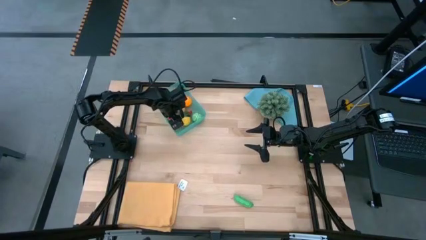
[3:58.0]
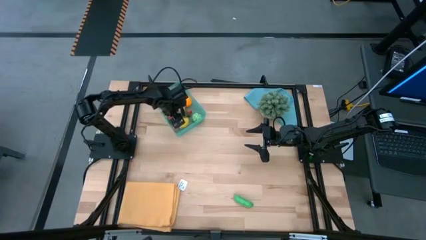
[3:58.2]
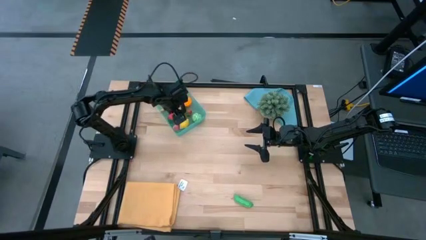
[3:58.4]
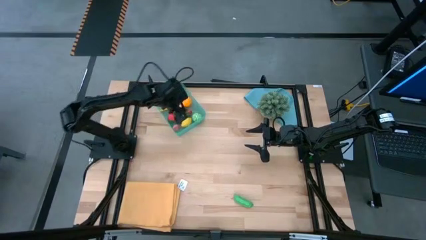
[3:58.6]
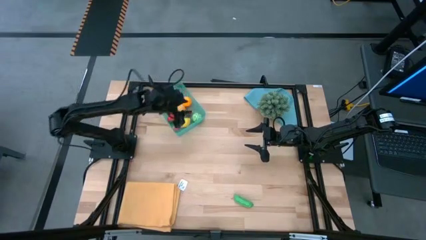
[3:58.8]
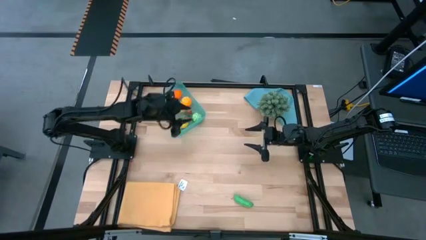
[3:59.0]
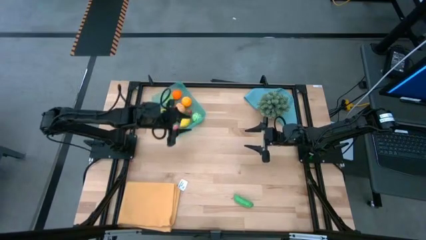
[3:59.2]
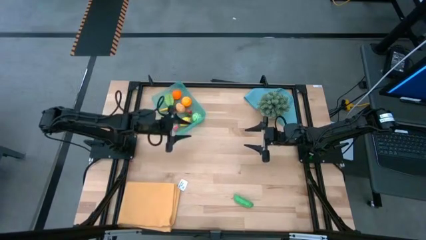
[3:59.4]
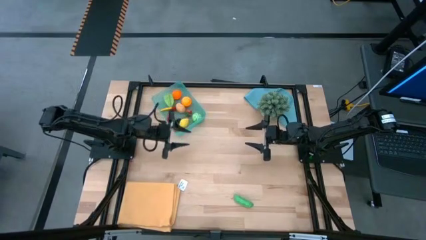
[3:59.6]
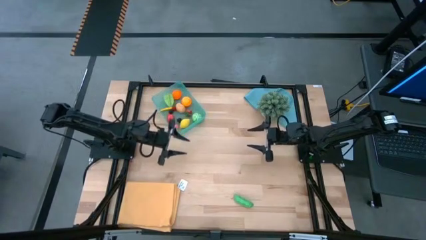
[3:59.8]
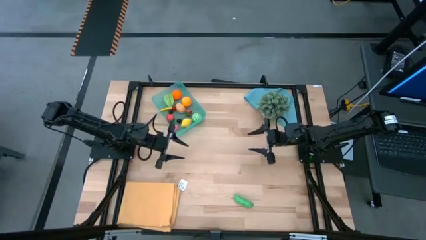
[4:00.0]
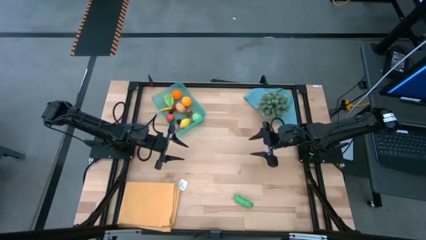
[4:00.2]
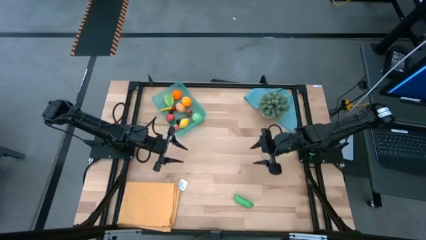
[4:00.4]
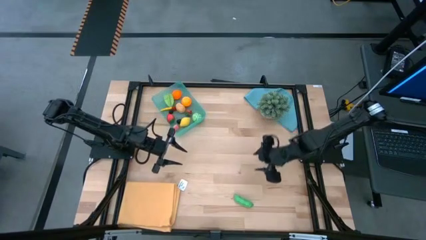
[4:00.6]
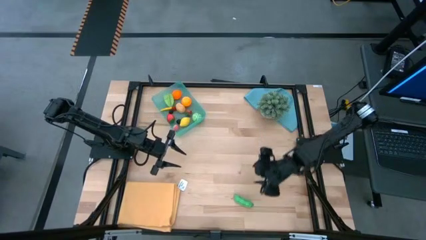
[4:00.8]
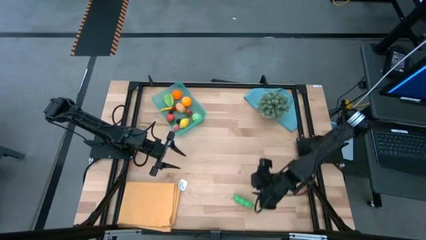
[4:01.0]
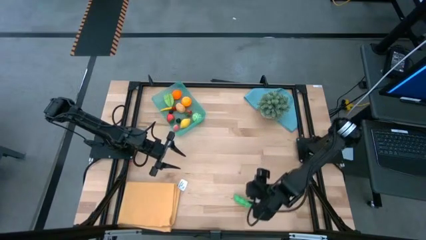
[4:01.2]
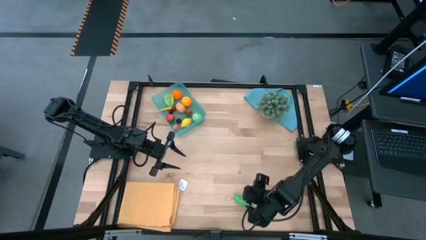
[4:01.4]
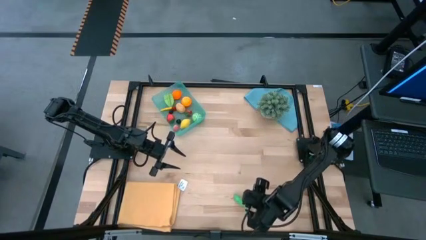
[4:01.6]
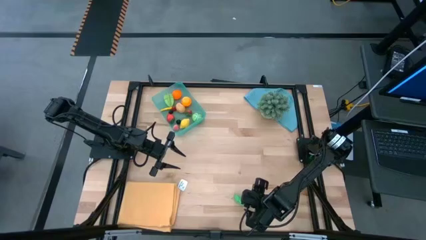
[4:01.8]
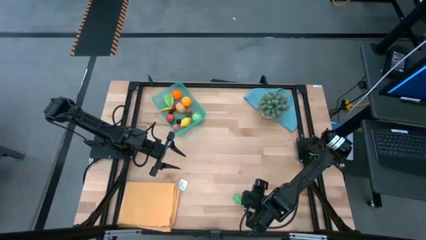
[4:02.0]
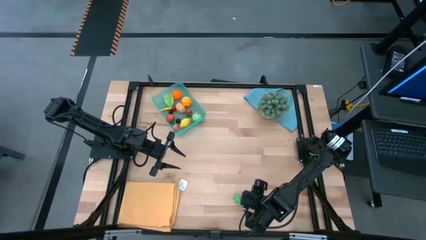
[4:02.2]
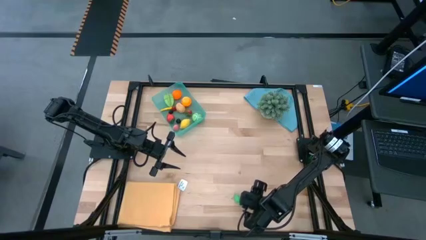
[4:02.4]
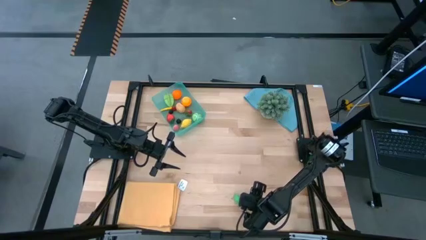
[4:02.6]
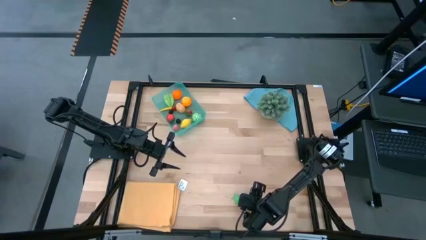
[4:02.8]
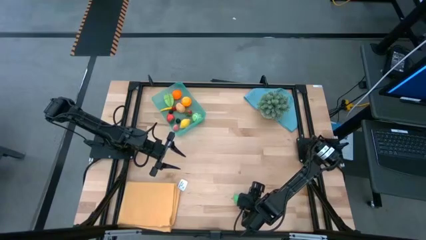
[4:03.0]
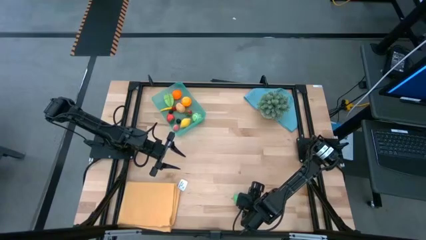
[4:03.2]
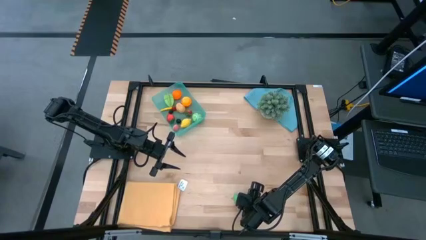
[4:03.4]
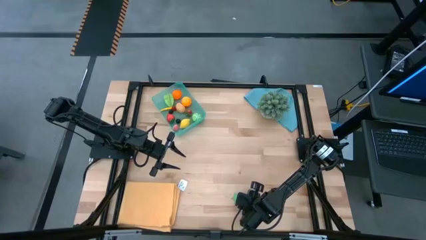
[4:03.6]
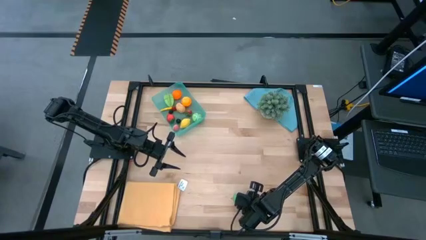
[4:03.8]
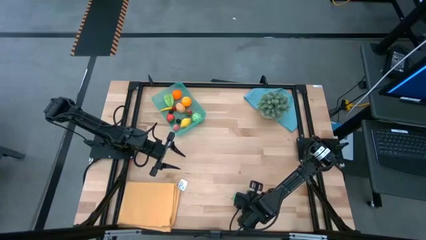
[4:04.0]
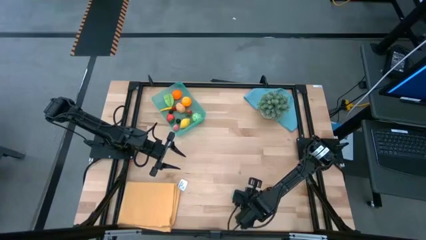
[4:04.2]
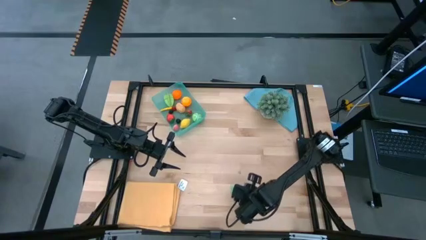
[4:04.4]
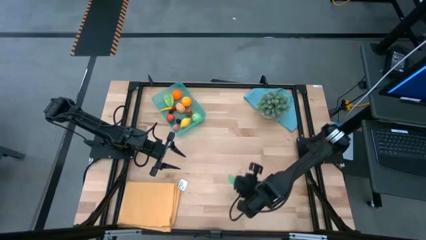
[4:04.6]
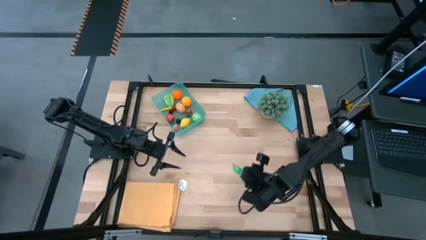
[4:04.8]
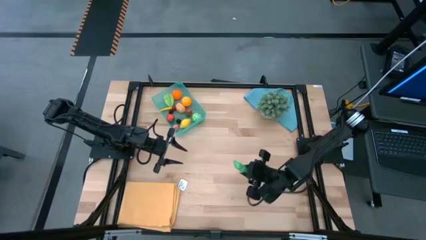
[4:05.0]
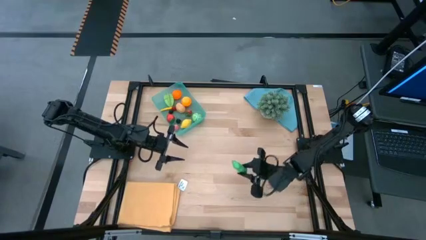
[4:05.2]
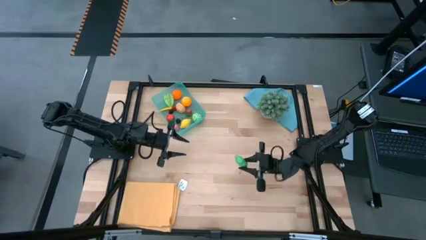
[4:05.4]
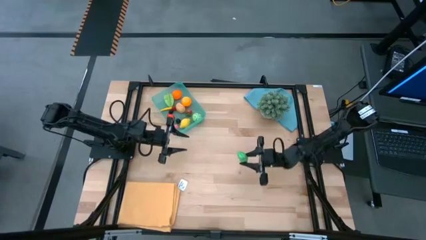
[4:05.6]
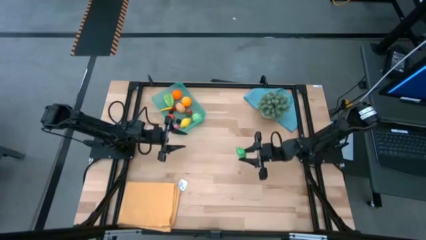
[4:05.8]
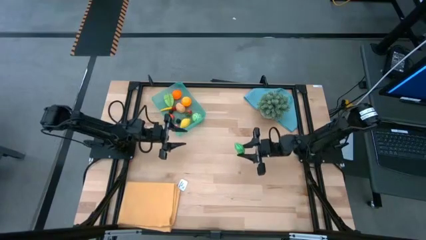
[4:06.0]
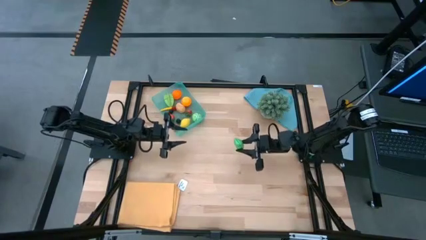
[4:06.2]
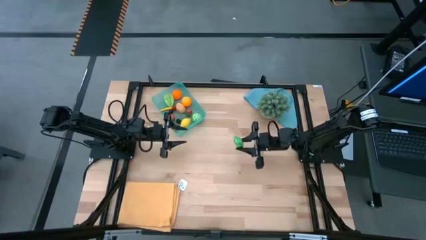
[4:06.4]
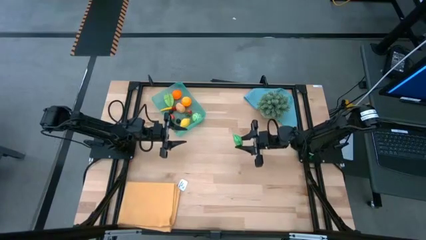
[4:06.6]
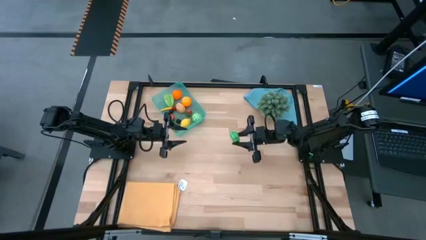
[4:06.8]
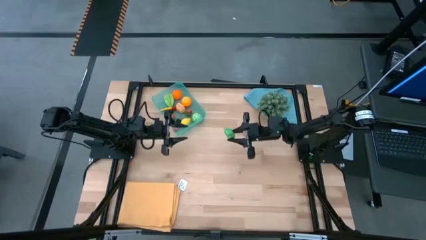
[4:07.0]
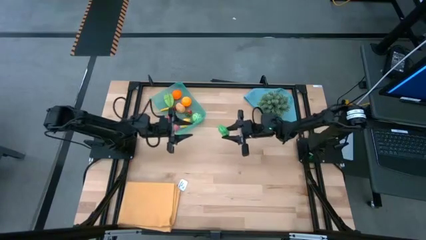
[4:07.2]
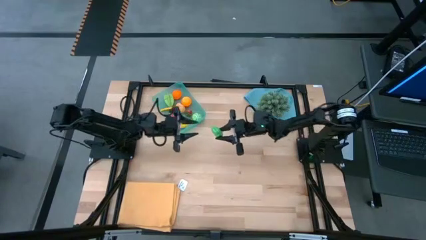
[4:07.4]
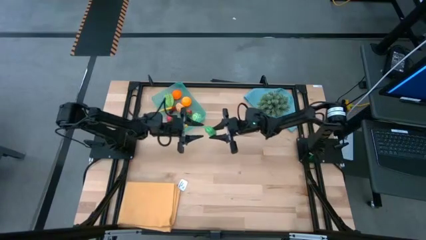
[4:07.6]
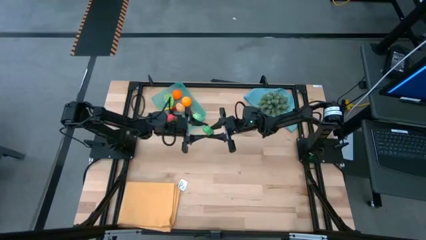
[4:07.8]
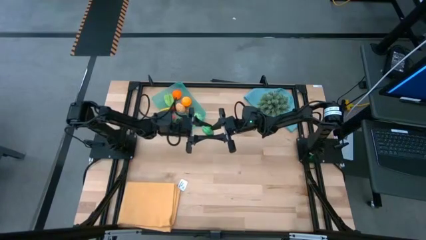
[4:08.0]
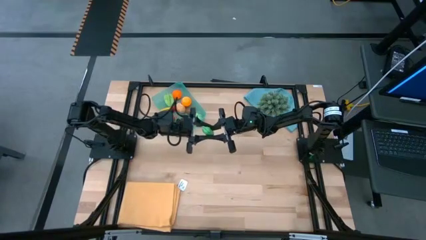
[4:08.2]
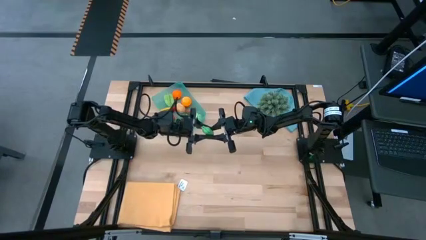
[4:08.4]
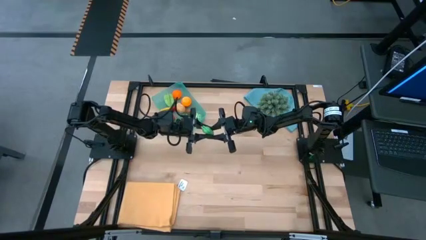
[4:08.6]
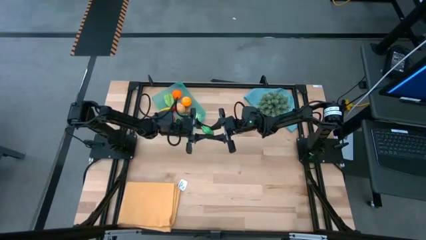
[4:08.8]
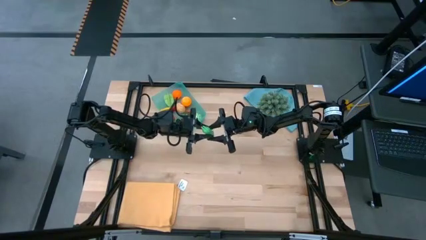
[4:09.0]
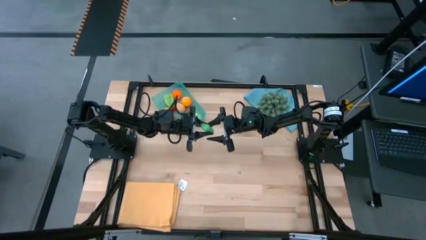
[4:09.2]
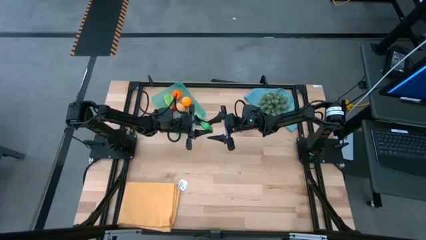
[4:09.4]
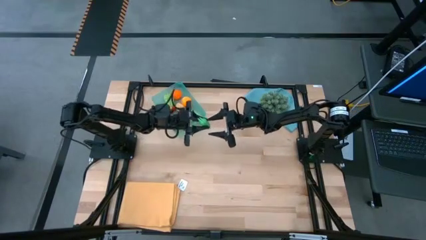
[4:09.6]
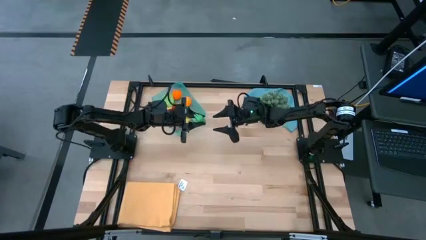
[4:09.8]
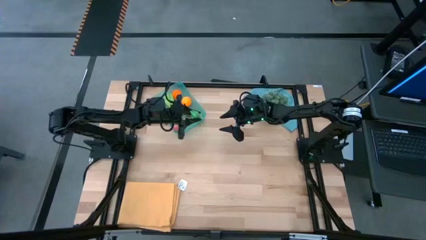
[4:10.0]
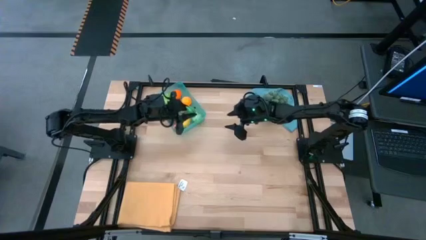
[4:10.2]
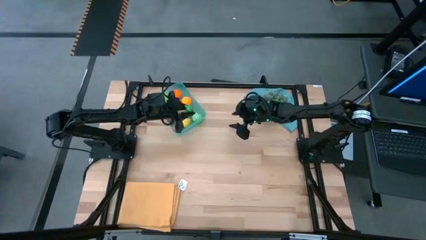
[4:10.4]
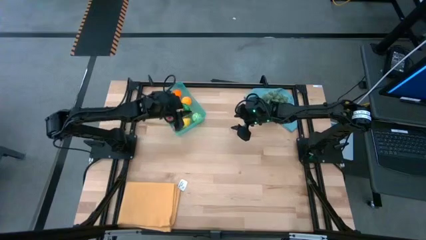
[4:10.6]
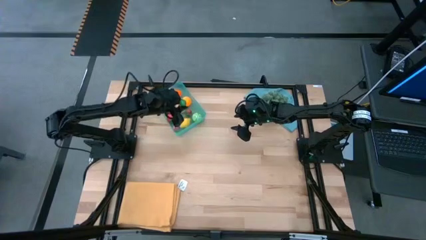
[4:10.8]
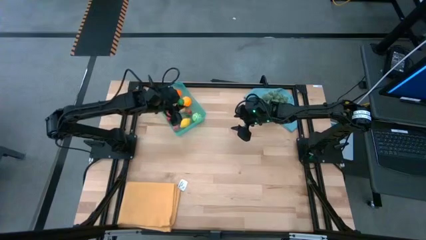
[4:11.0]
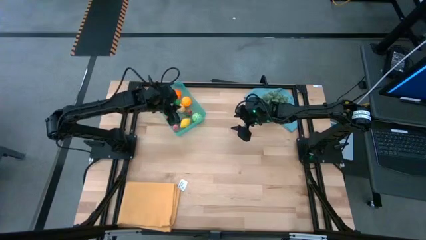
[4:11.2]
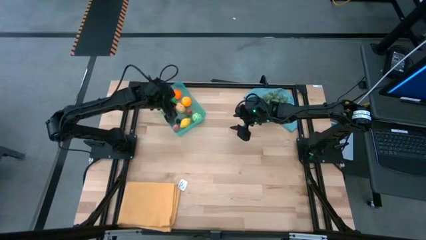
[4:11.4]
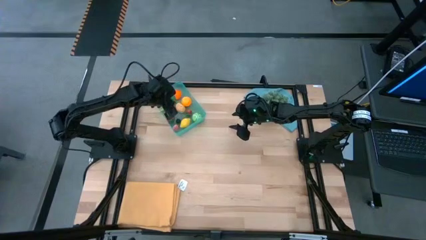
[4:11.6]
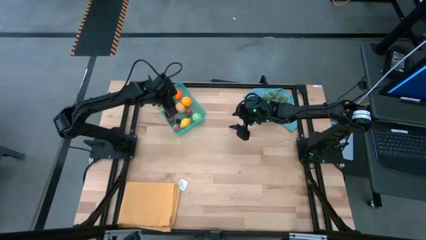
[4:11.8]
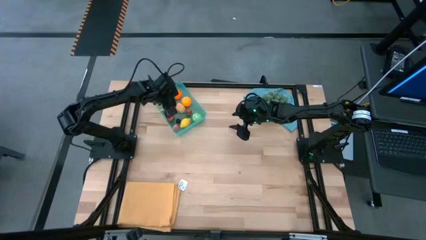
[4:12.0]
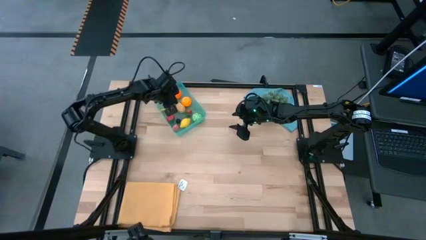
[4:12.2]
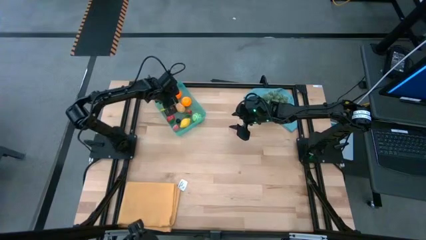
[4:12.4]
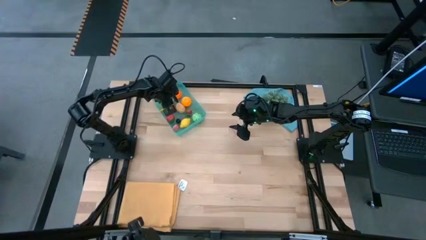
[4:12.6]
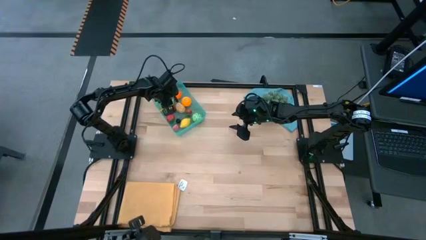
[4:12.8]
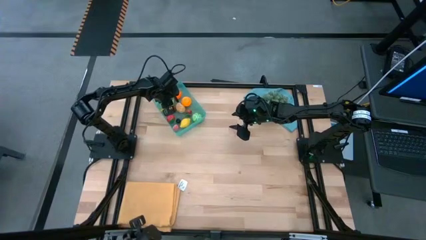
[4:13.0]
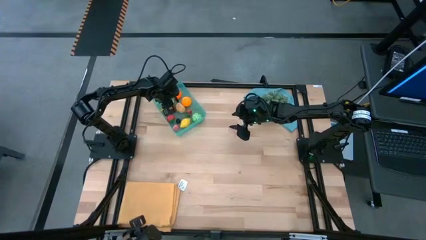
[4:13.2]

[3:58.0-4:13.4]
Task: Pick and placing Produce into tupperware
Put the green peas into the blue bin

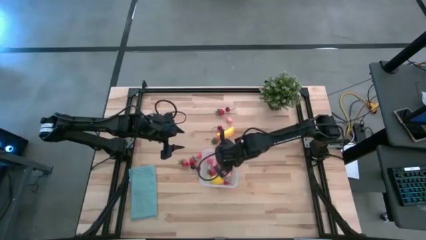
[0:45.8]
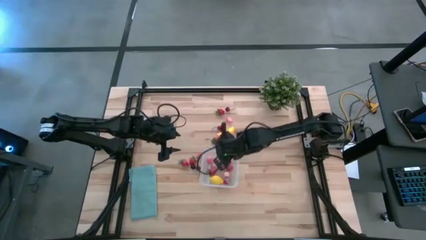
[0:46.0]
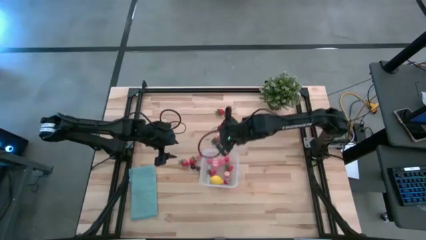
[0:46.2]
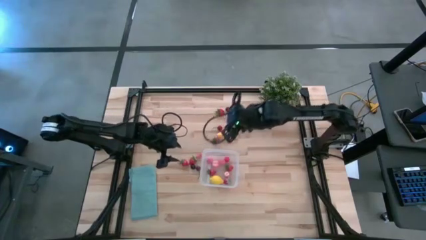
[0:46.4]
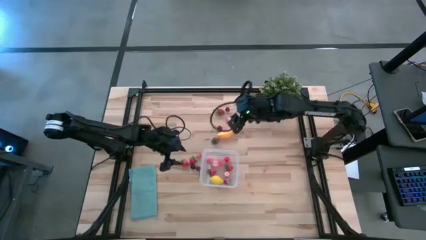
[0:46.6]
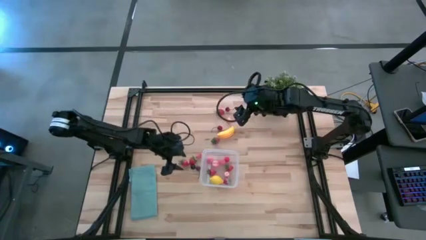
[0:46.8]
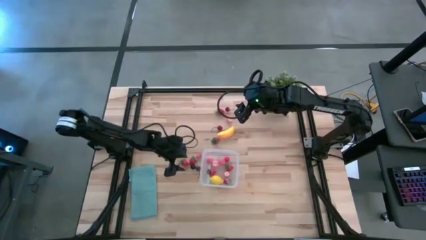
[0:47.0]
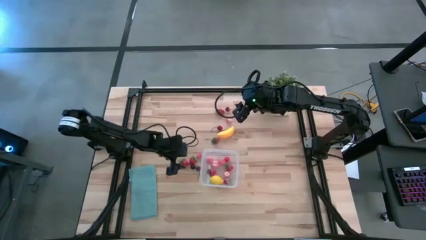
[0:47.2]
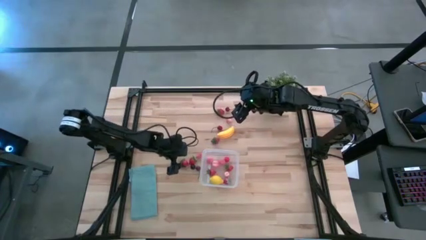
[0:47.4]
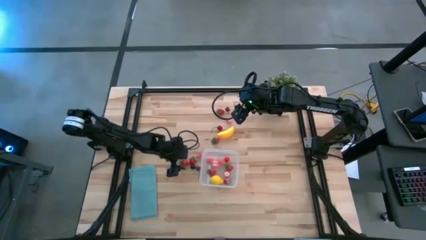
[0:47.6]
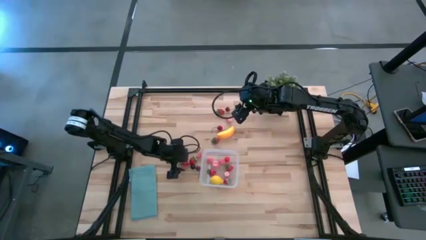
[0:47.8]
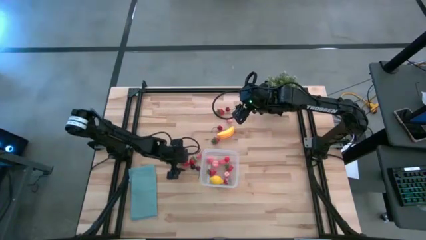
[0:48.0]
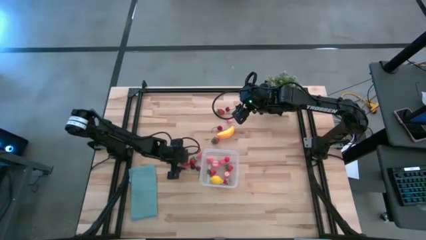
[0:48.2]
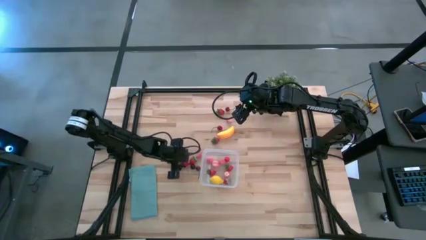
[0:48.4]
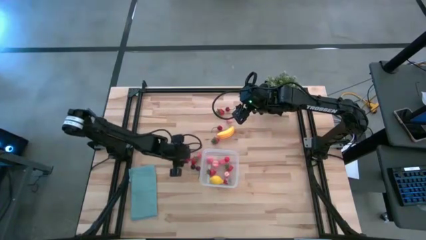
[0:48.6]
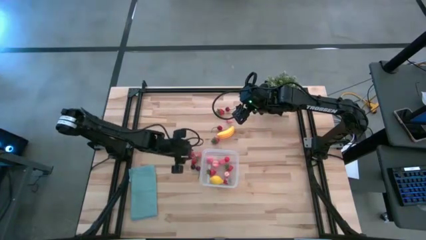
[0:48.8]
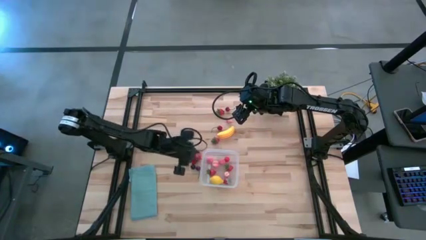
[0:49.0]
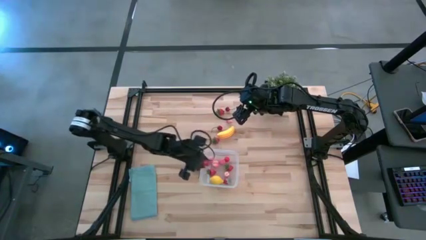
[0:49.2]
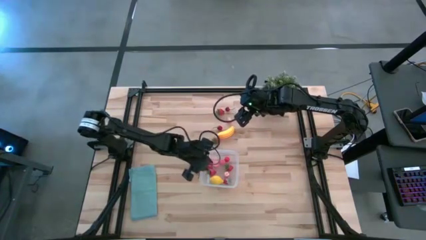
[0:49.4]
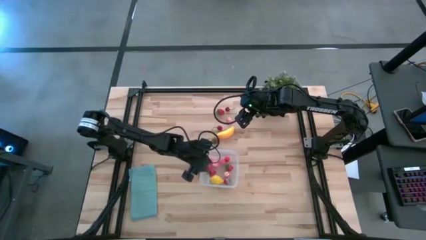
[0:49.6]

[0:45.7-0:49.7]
Task: Pick and placing Produce into tupperware
Put the red strawberry into the transparent container
